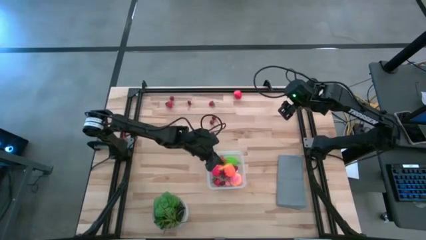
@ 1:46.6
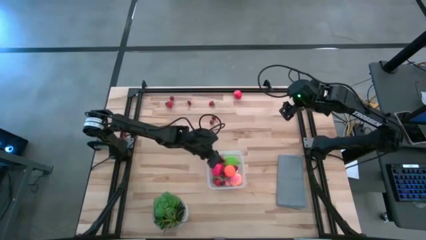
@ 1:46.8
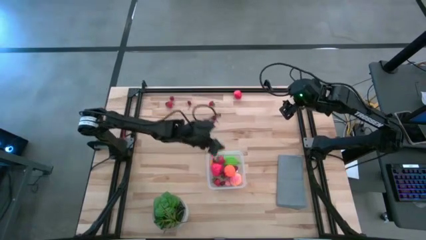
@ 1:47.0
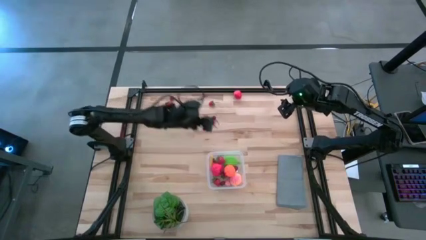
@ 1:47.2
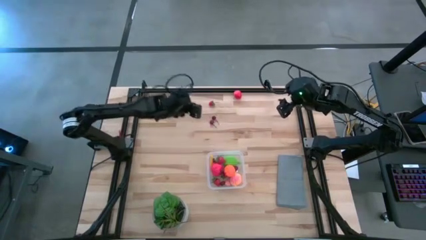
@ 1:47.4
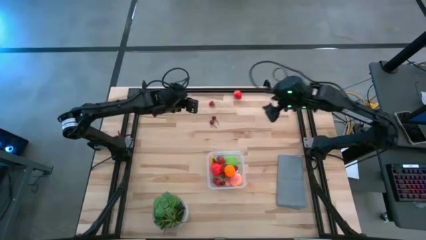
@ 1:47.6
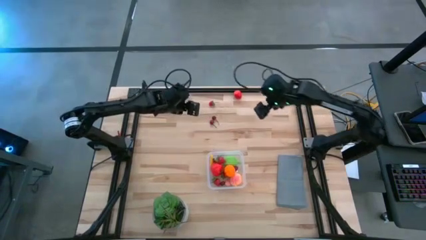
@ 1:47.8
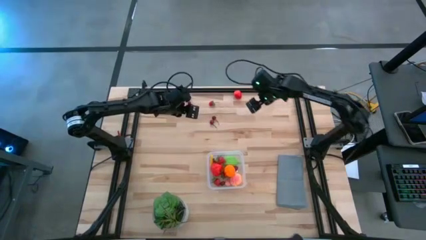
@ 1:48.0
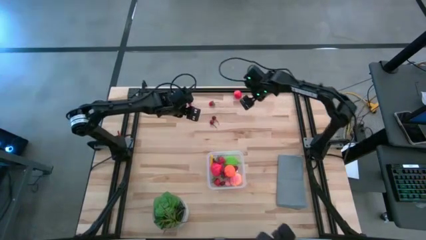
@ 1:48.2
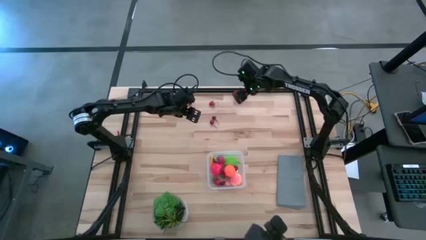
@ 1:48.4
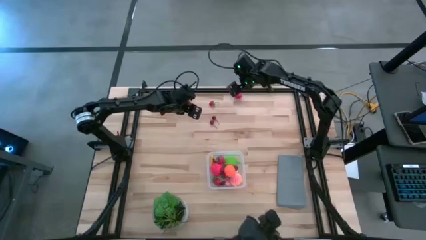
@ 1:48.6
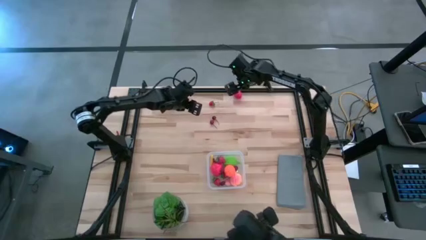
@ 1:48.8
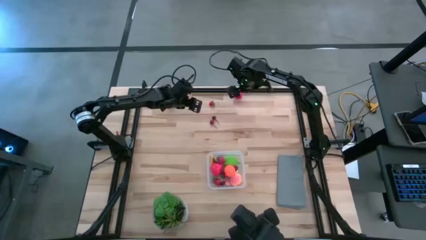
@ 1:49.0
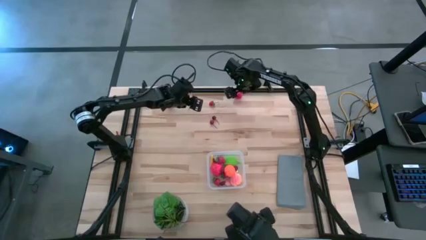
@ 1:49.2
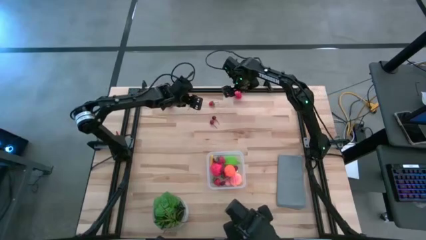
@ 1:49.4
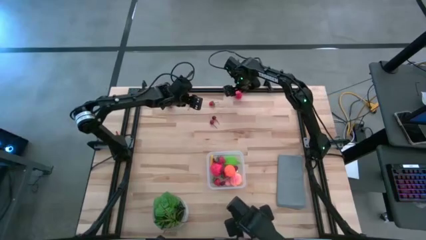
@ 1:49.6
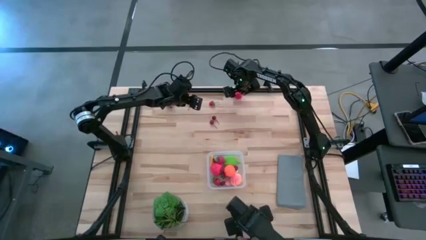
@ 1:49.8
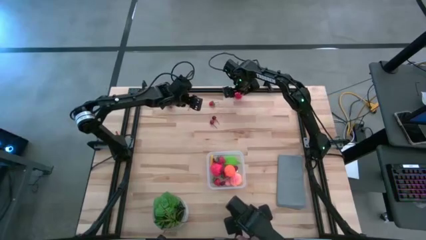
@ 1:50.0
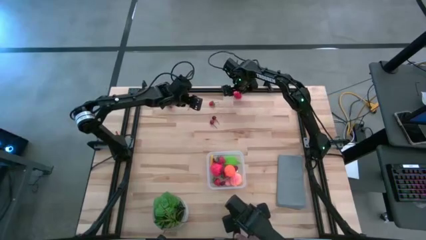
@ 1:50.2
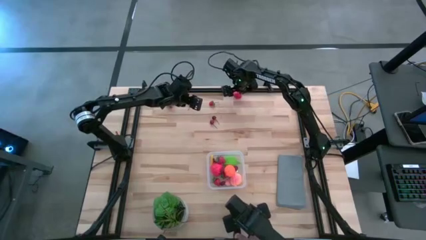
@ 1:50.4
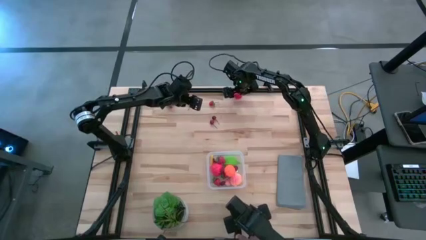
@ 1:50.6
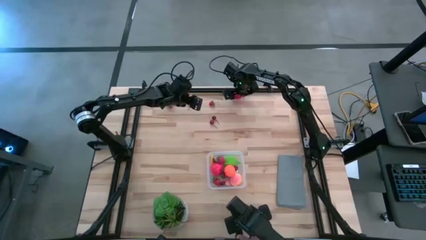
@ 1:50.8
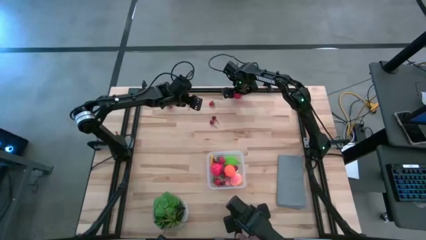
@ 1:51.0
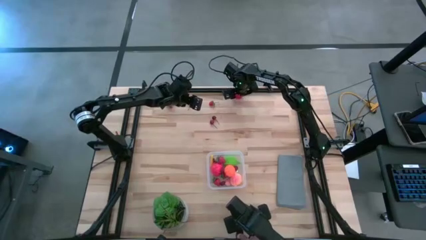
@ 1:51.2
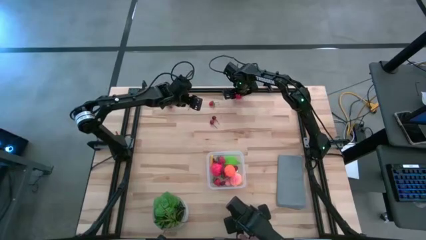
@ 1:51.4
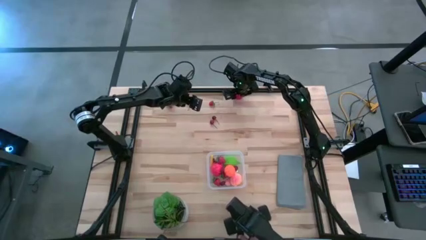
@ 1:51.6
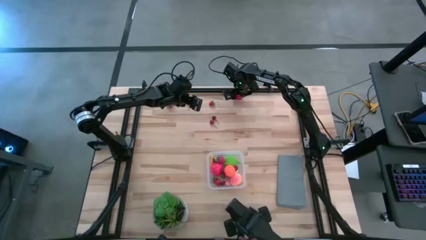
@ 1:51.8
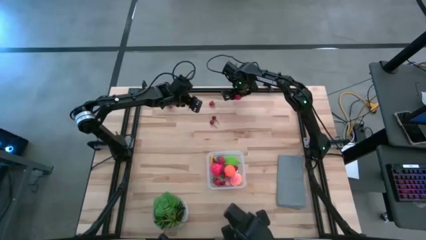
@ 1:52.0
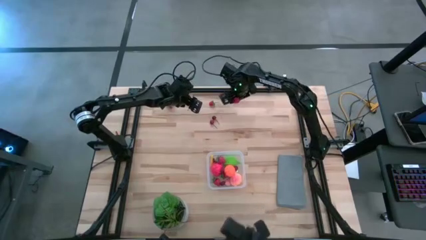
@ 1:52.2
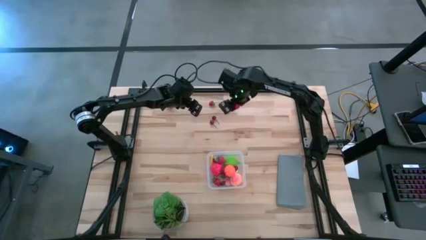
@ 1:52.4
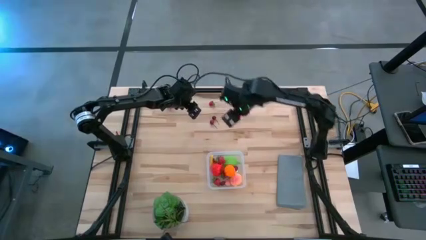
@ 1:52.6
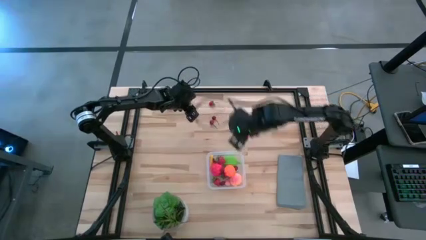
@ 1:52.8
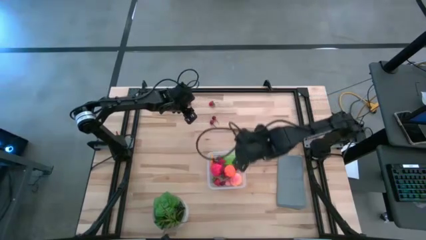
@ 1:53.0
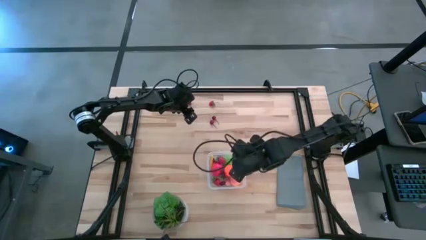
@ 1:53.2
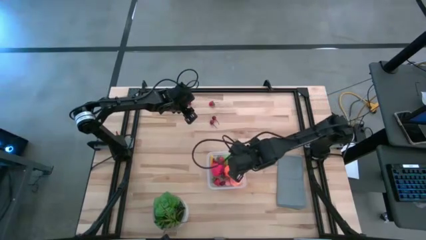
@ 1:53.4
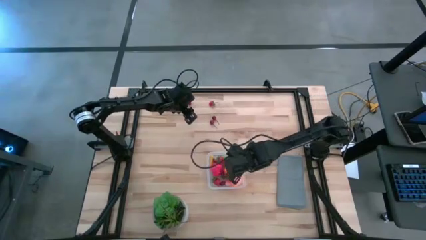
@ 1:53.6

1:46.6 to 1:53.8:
Task: Pick and placing Produce into tupperware
Put the red strawberry into the transparent bin

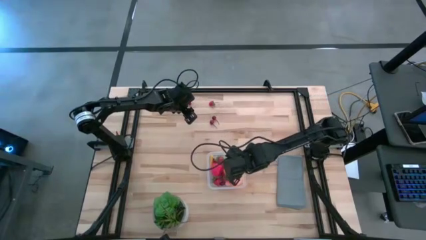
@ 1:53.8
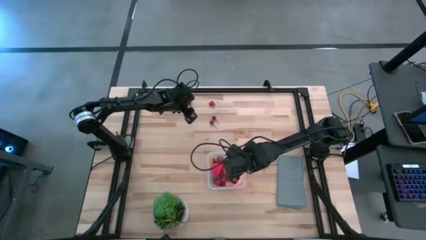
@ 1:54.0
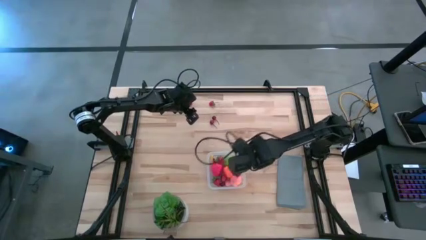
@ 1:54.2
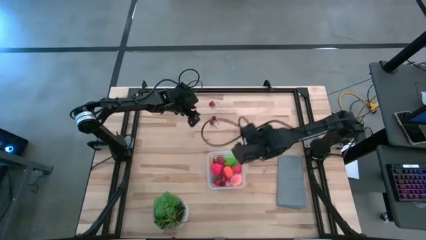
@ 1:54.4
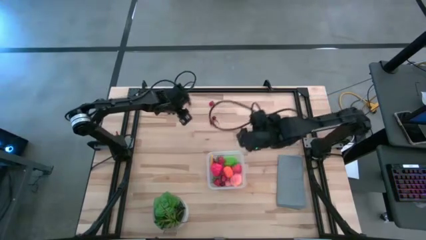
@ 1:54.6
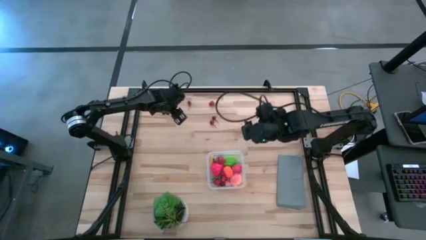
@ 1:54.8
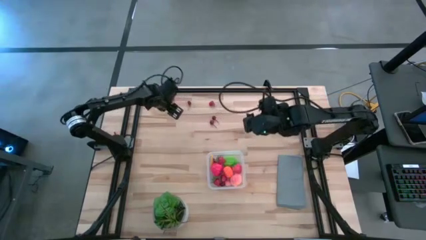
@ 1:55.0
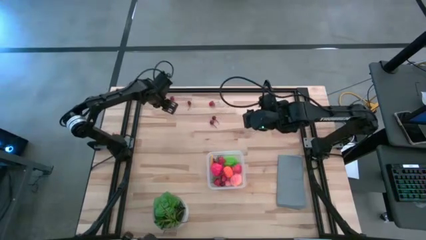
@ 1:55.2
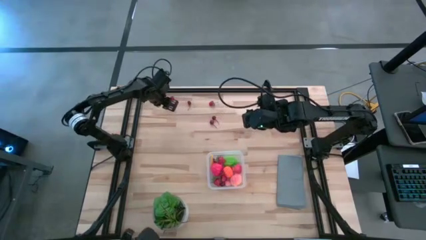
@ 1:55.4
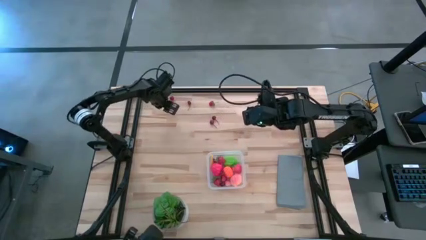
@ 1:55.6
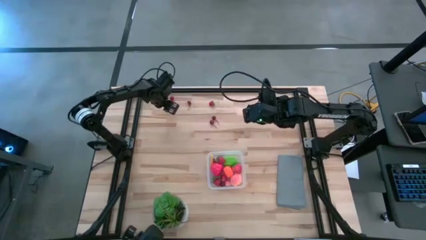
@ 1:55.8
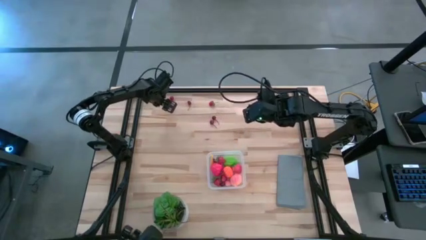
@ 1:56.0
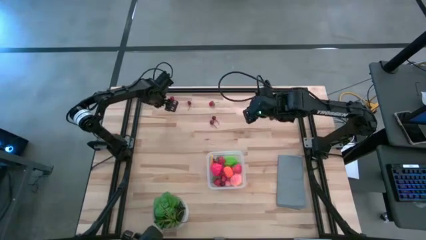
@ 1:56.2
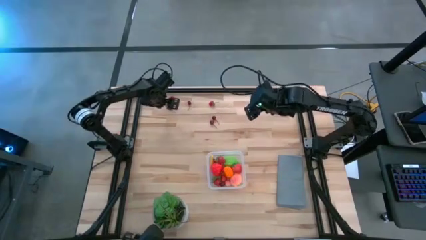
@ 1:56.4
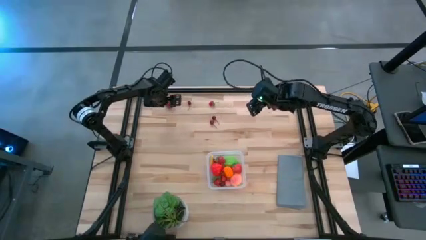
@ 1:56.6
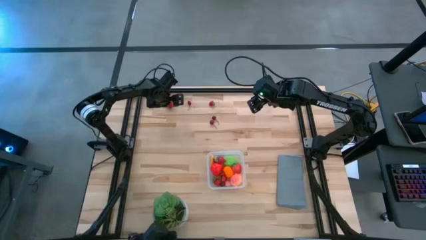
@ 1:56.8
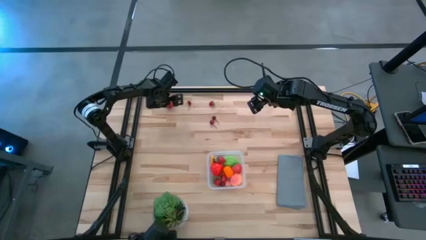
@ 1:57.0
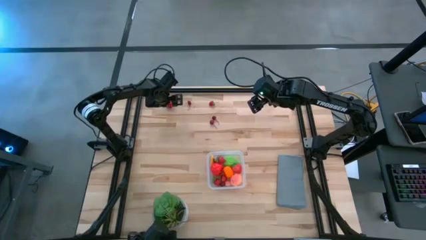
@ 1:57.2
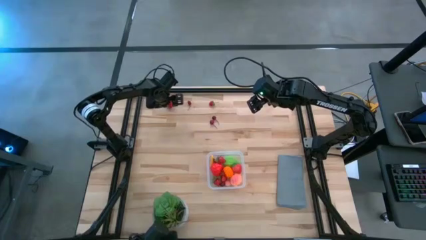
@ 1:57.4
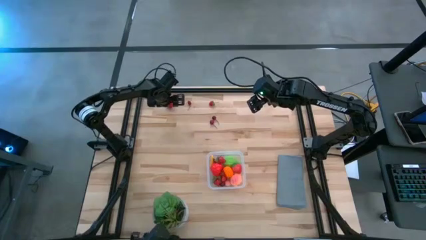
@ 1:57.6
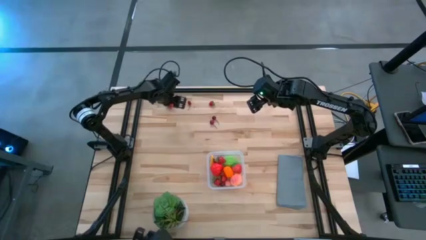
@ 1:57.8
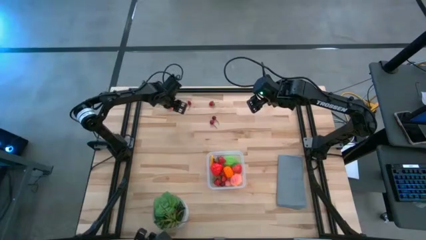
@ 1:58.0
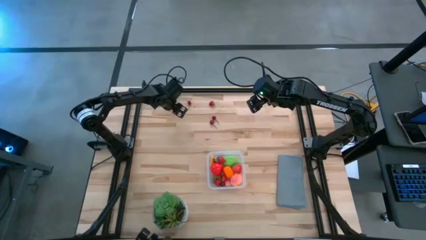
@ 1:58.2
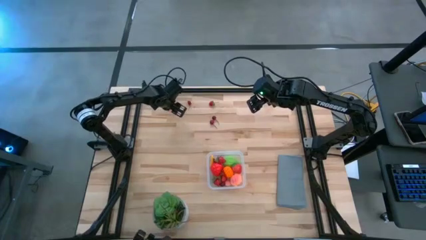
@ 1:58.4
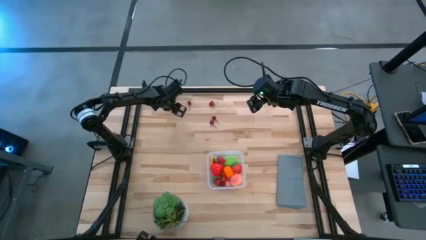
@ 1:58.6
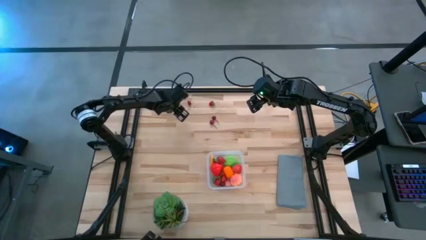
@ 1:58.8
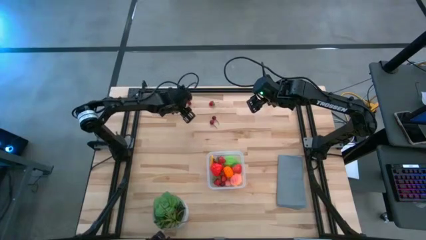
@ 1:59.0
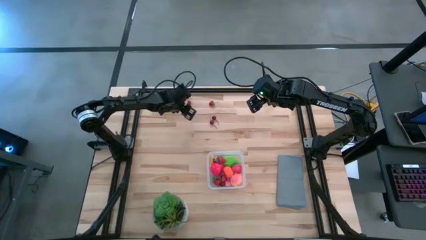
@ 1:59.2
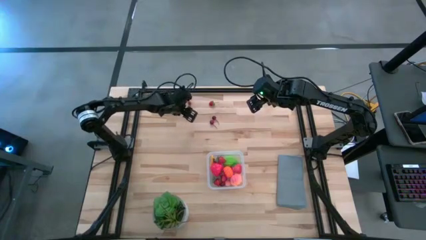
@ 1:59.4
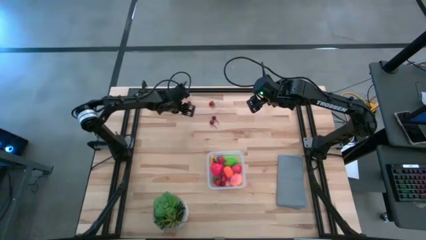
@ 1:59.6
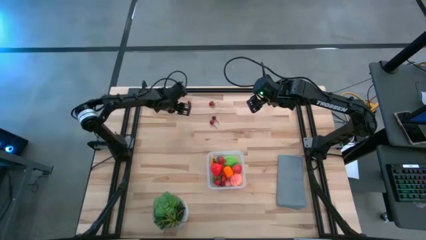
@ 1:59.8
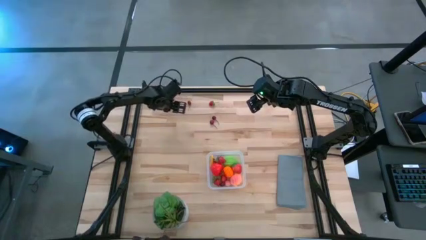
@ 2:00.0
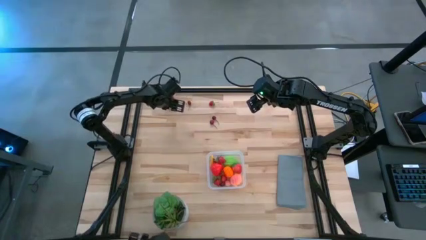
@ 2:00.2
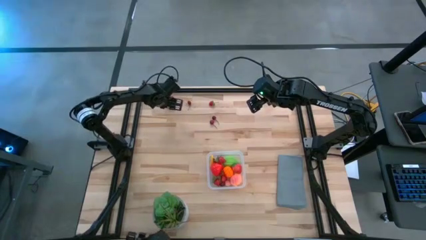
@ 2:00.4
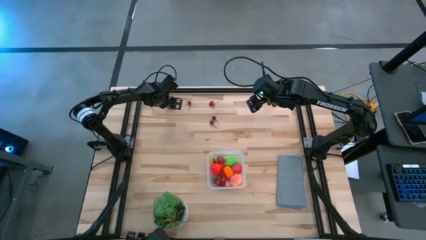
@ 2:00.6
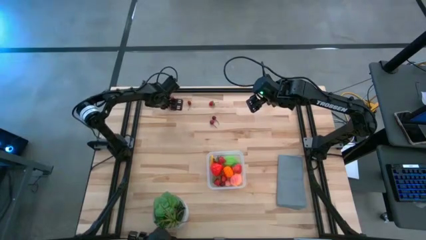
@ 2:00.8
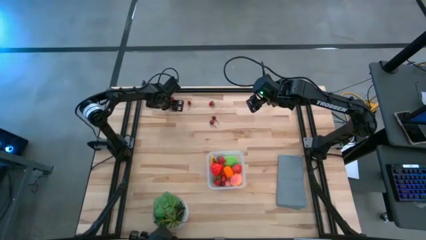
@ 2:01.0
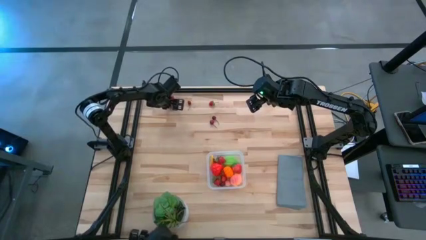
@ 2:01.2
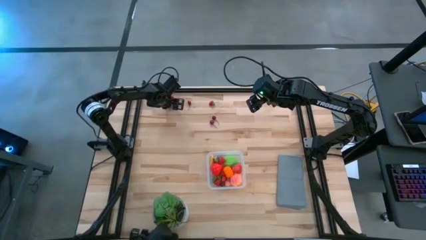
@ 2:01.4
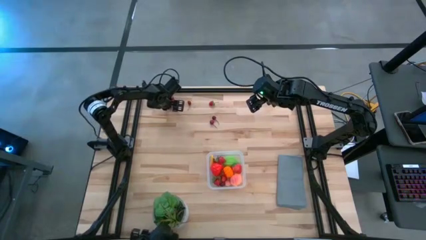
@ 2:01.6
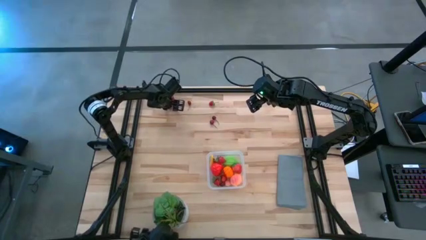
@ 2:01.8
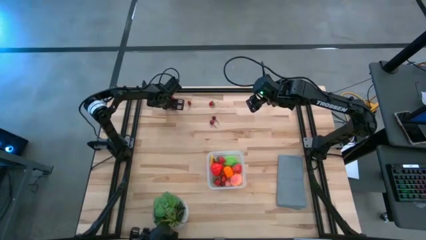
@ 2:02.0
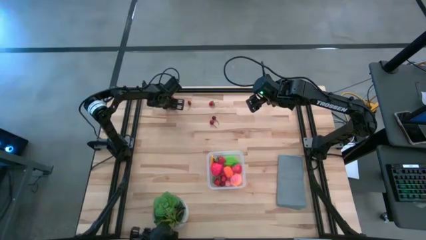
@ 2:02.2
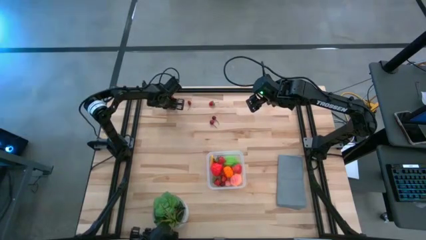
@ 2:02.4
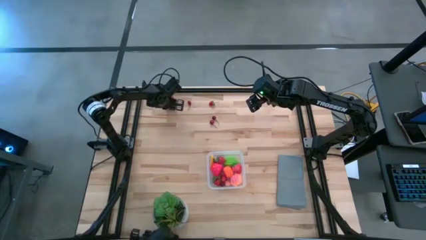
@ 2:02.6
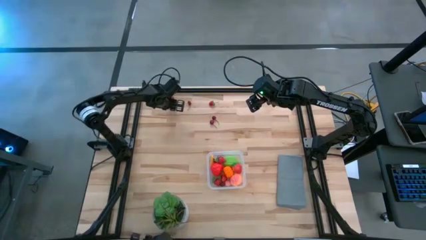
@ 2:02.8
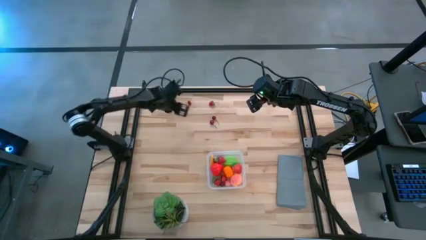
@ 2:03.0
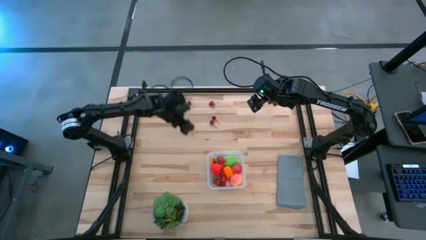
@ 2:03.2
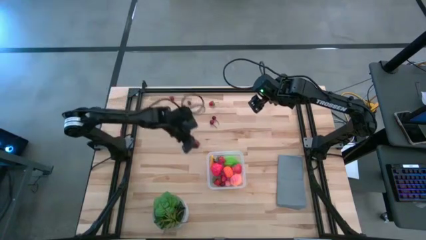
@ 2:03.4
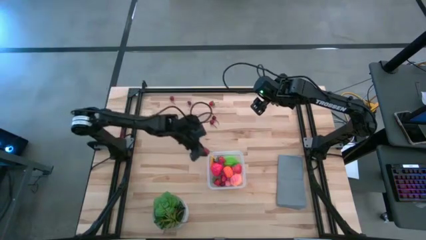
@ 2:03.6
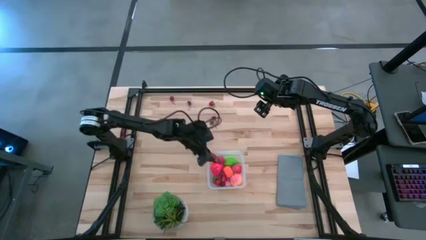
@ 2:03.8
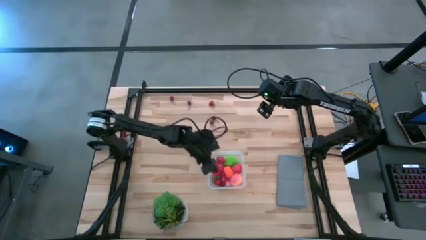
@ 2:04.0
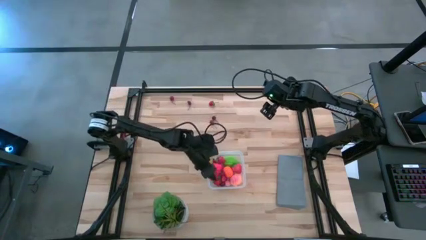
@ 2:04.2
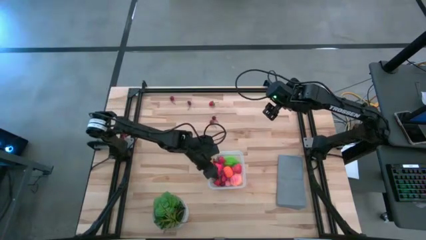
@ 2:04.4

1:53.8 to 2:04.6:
Put the red strawberry into the transparent bin
